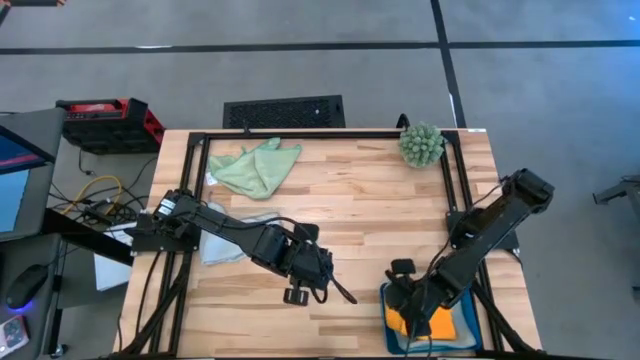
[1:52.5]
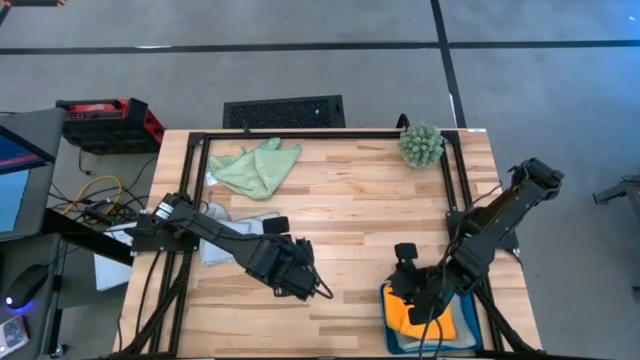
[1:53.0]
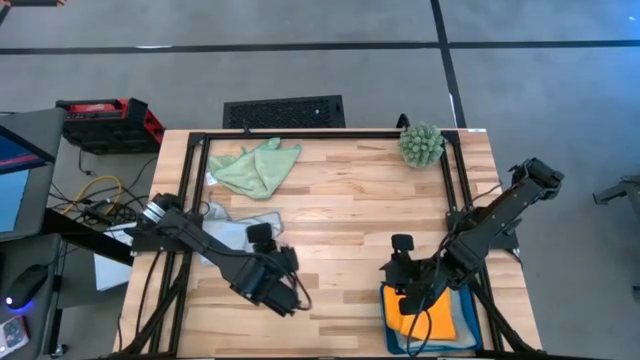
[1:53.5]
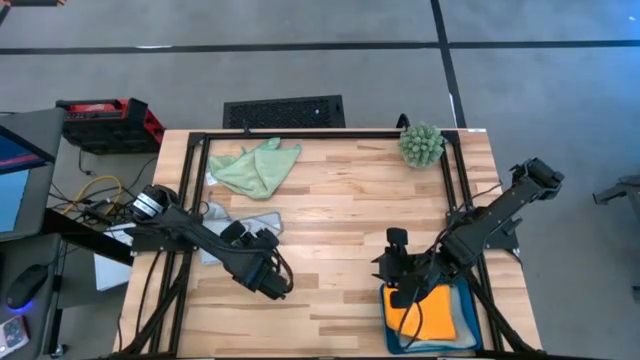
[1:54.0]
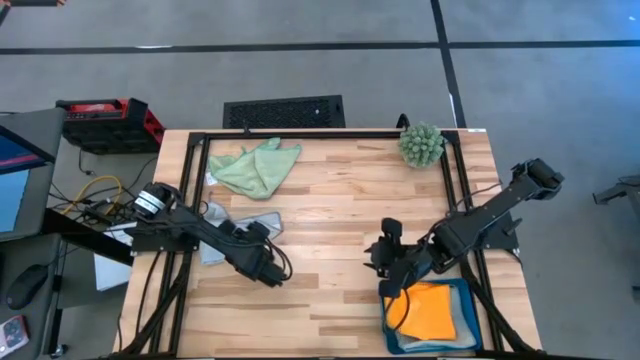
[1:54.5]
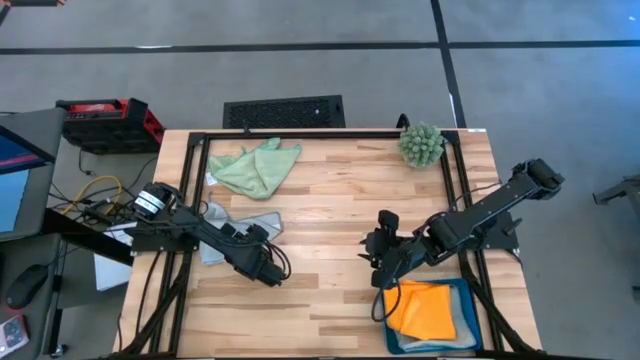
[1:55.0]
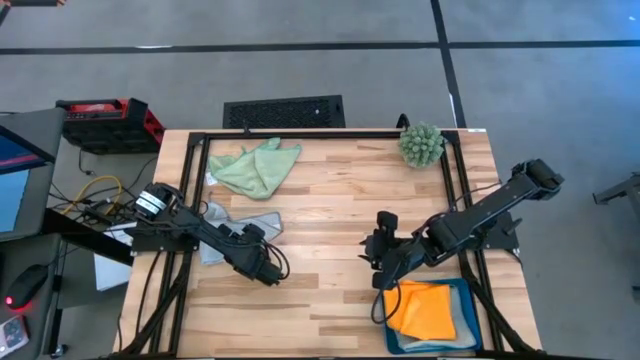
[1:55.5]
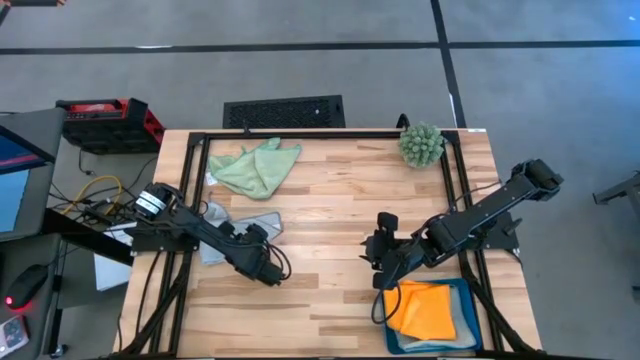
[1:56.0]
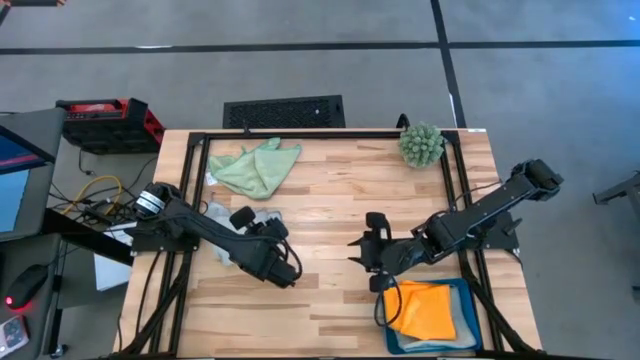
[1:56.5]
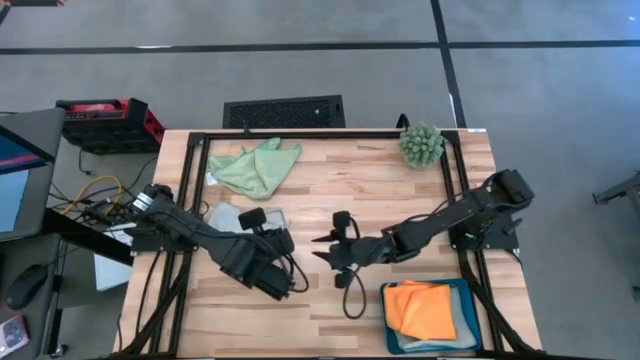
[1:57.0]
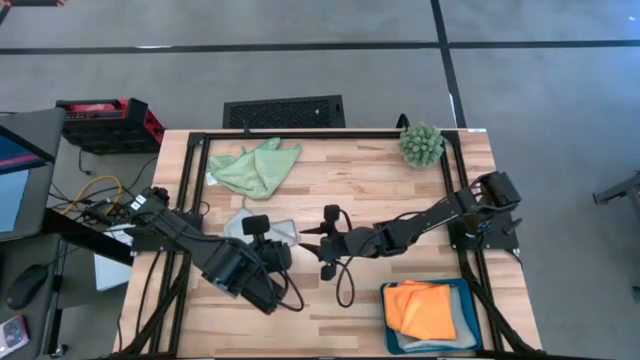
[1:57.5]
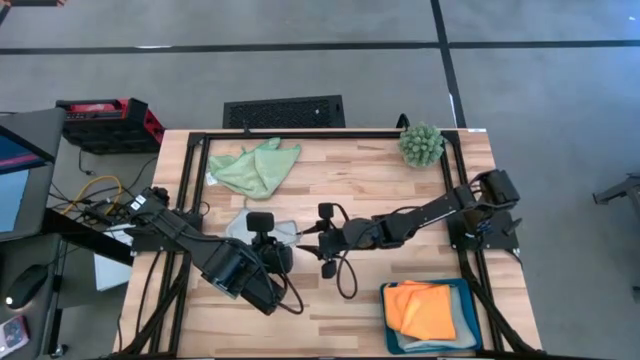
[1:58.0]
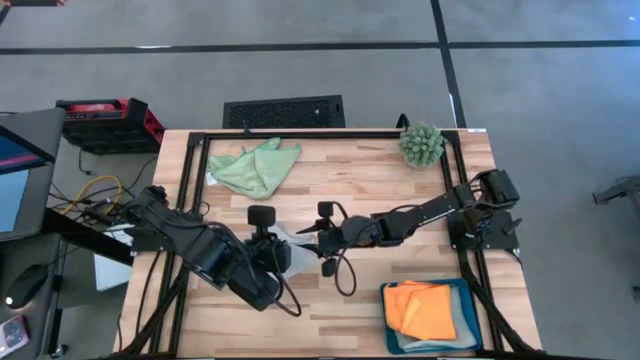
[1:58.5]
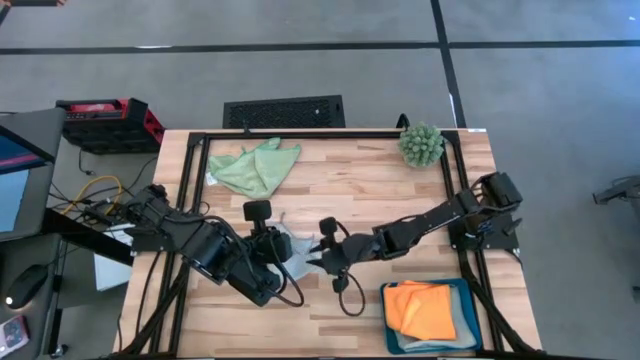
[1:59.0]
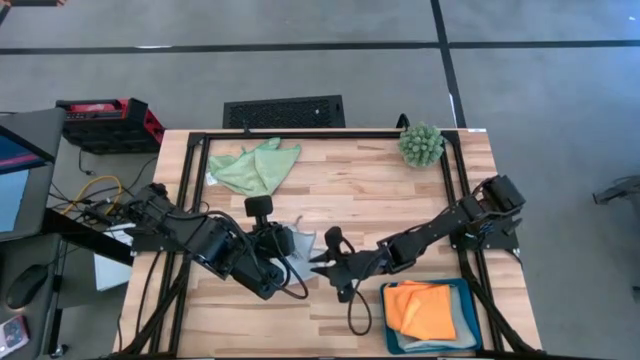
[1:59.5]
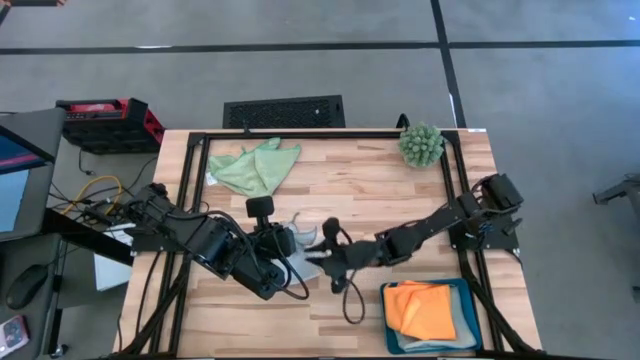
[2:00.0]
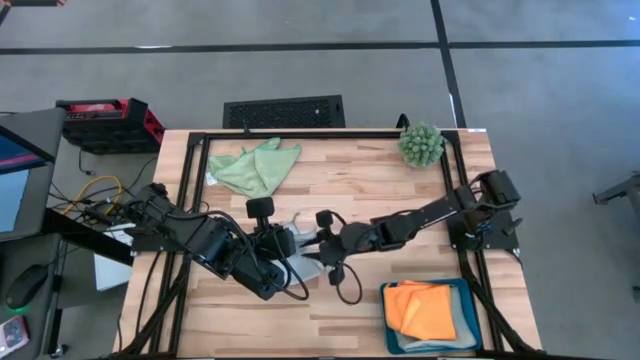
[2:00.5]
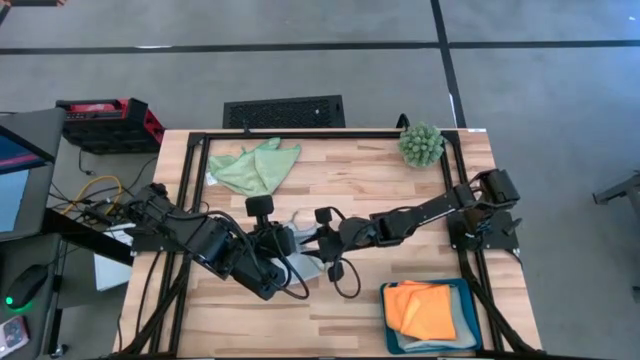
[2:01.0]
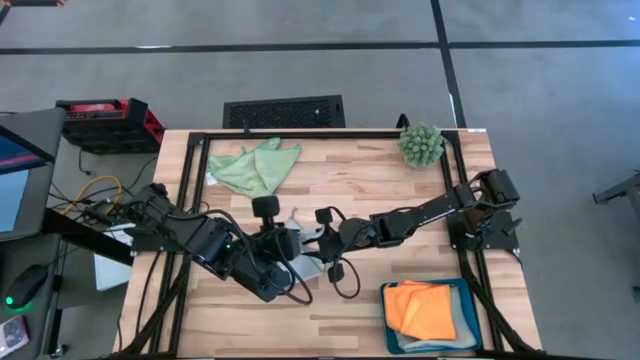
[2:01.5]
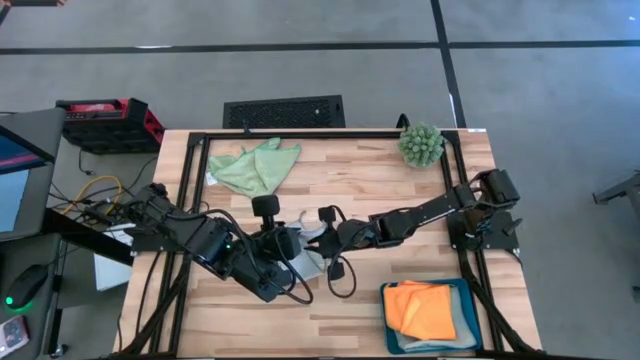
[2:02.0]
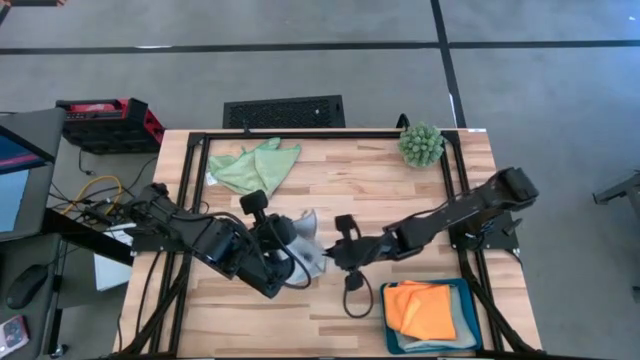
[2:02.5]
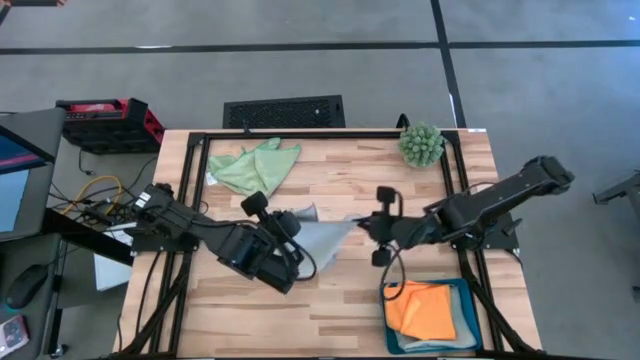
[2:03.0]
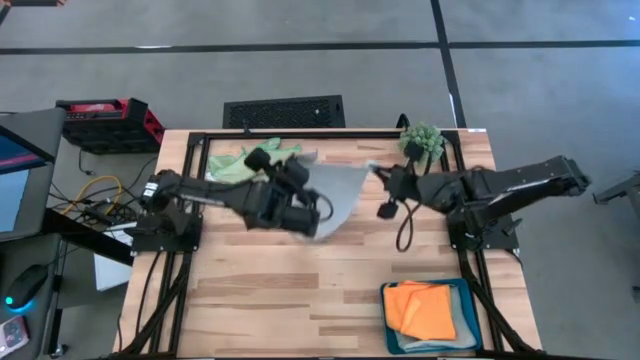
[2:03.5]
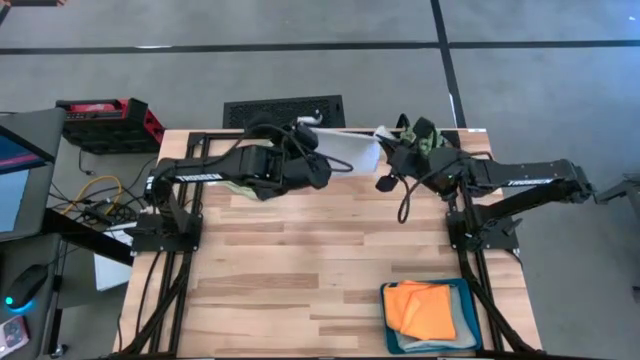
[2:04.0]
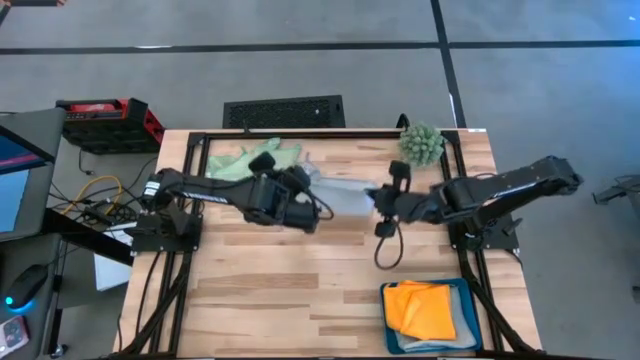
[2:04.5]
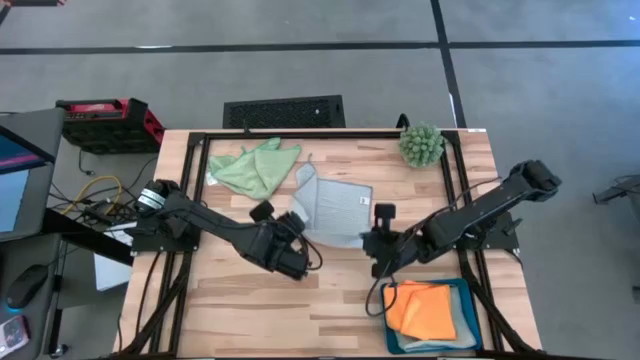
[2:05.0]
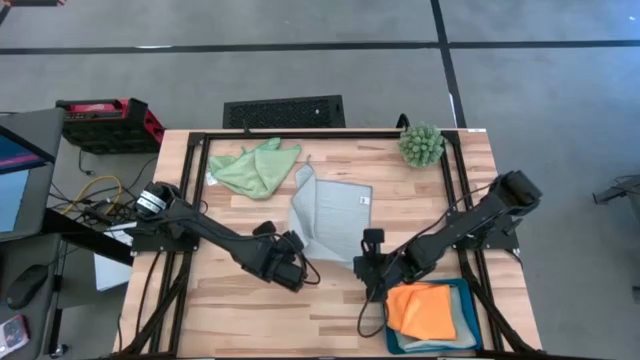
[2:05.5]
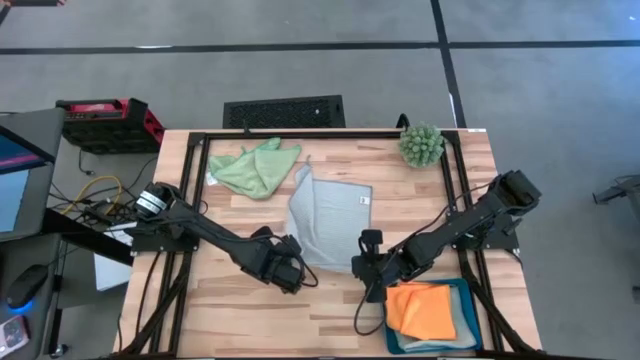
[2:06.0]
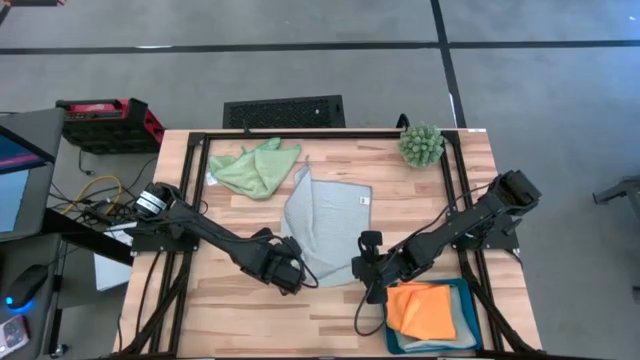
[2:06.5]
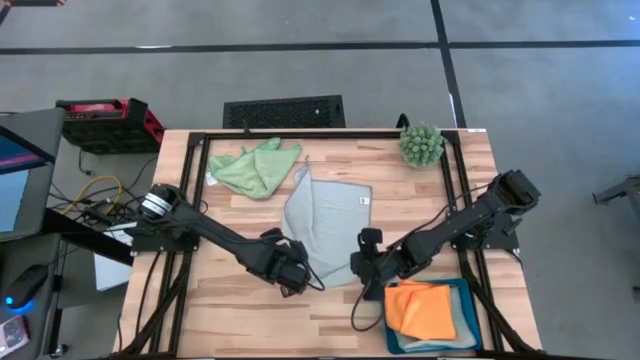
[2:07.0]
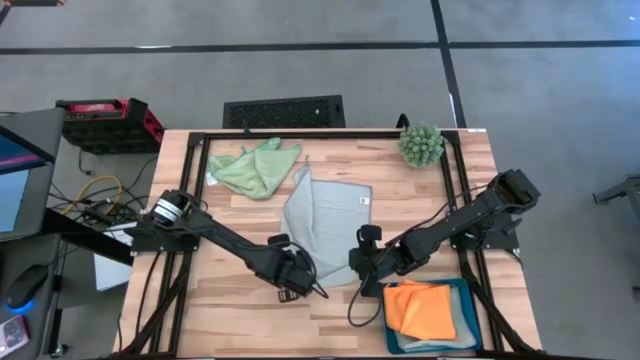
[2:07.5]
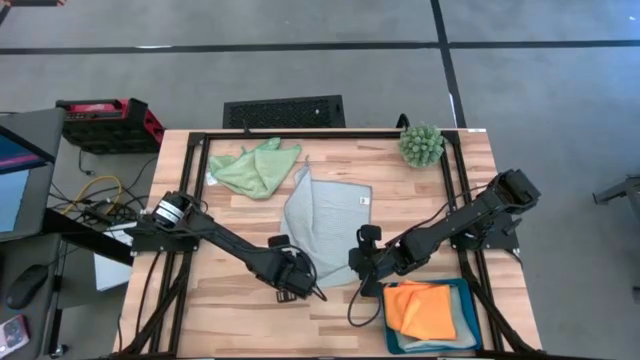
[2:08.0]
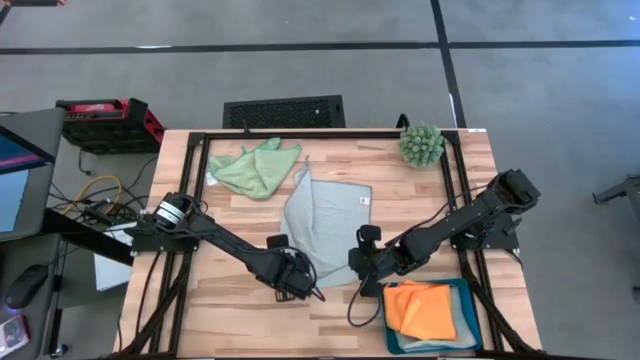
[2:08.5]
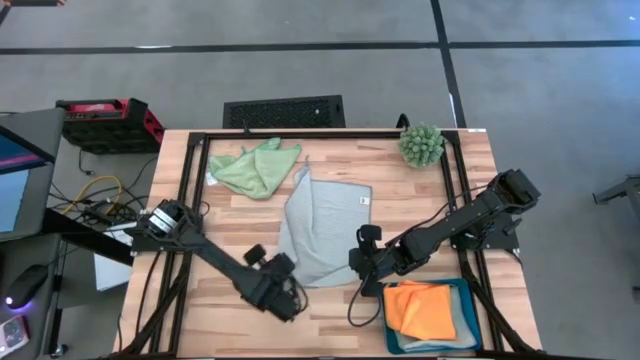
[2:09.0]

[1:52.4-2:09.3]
Task: Fold microfiber towels
Fold the gray towel

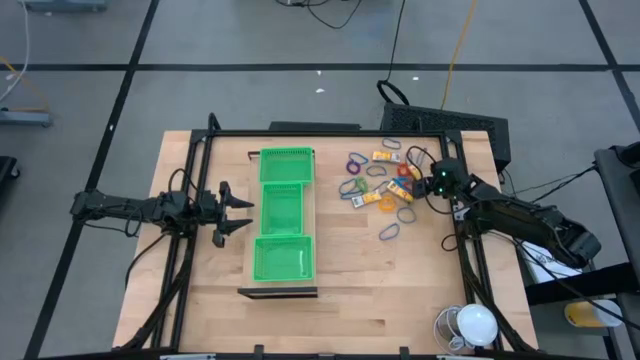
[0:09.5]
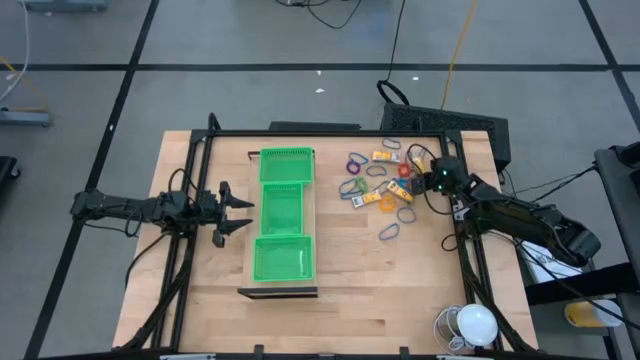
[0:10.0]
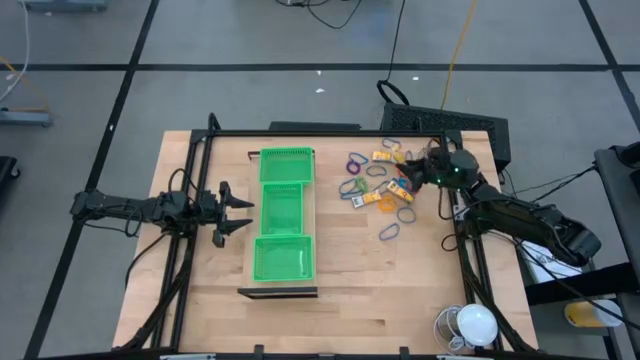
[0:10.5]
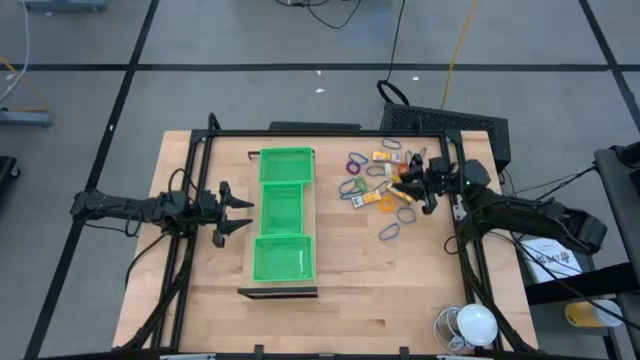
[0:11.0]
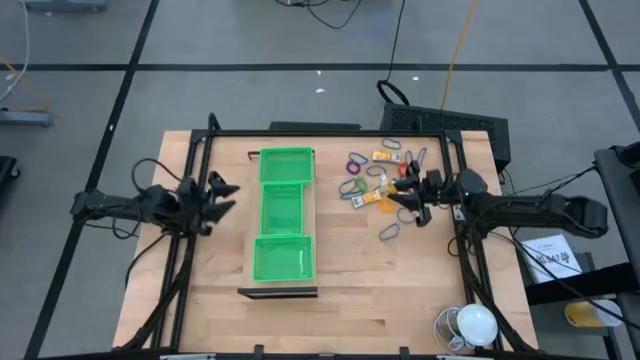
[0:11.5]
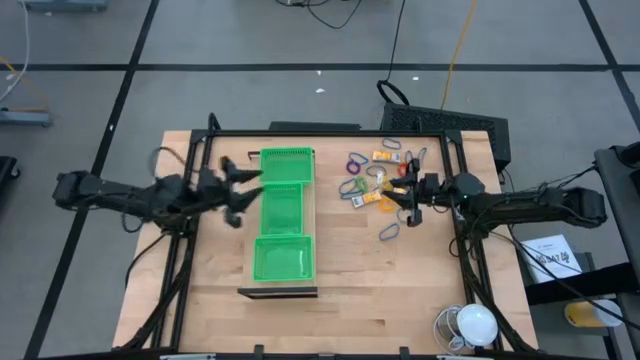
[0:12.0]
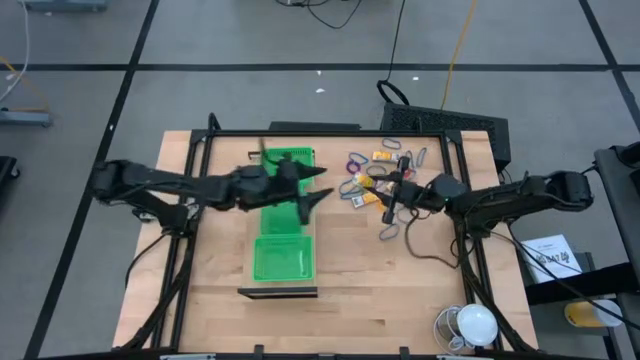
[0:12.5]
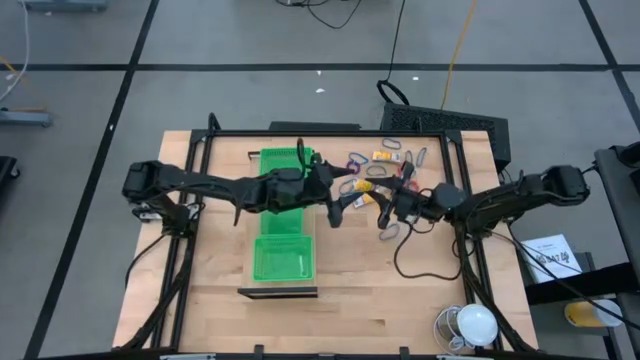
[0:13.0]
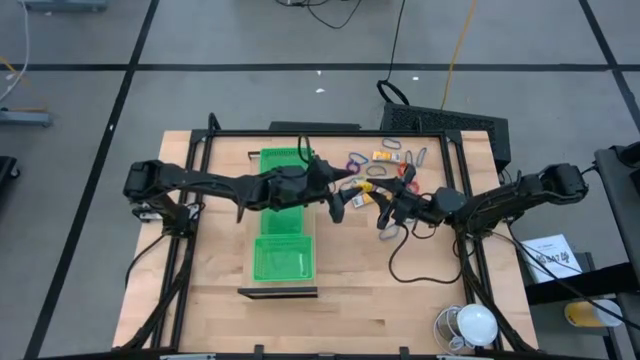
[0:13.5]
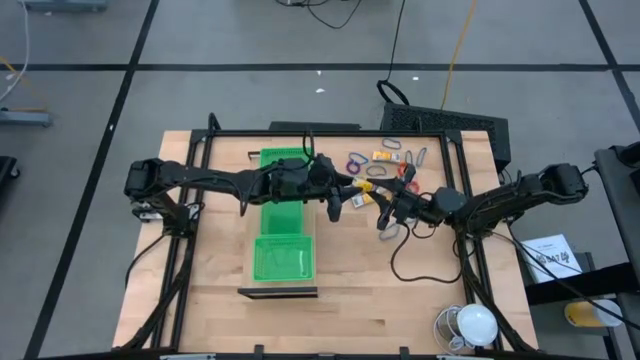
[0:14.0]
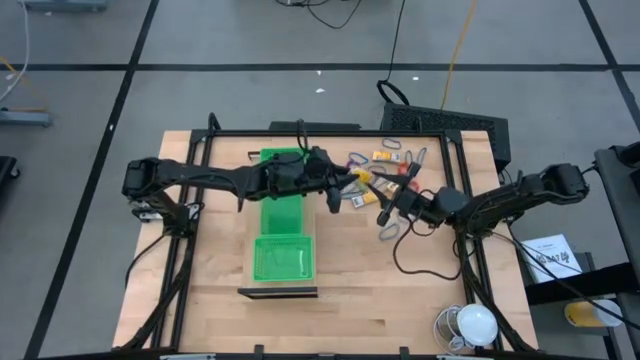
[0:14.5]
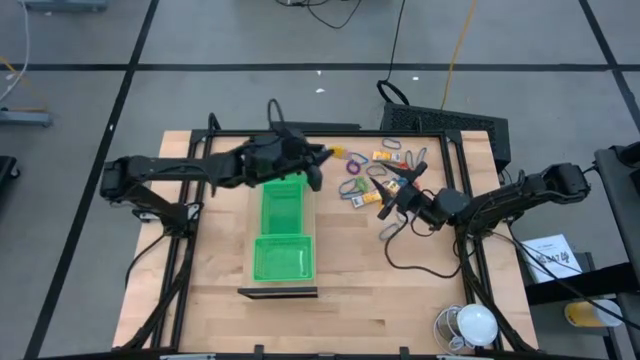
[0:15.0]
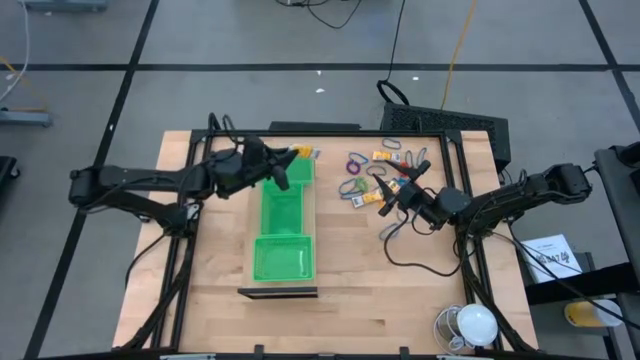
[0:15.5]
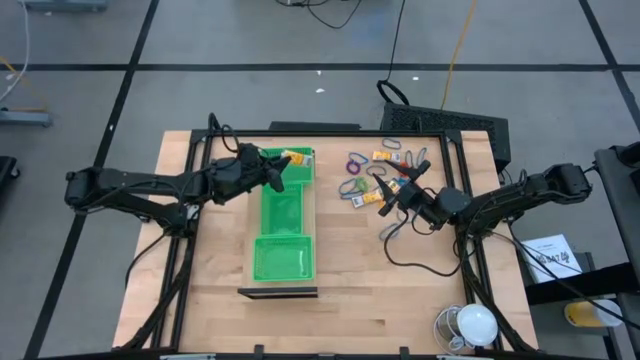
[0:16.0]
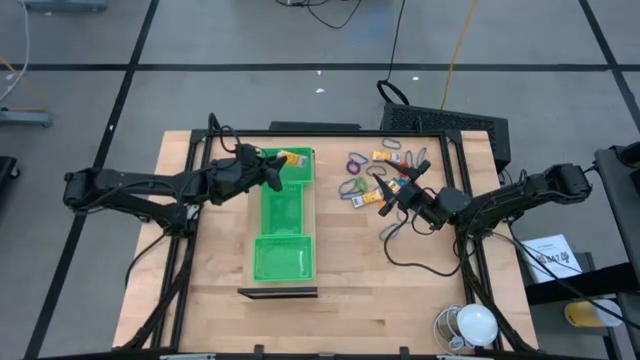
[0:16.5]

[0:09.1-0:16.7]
Task: Pick & Place Office Desk Supplies
Put the yellow crayon box into the top green bin on the shelf
